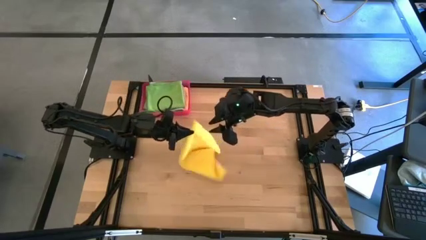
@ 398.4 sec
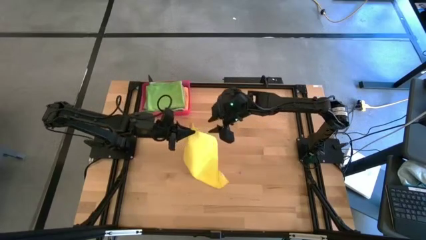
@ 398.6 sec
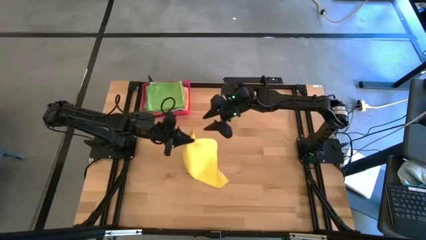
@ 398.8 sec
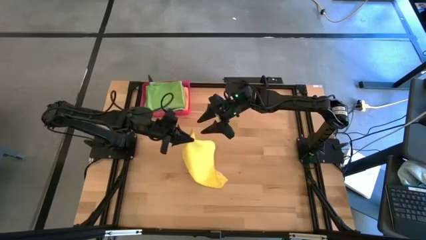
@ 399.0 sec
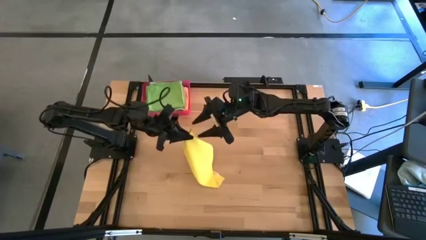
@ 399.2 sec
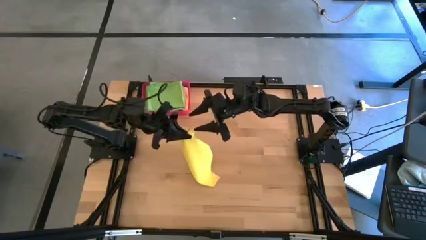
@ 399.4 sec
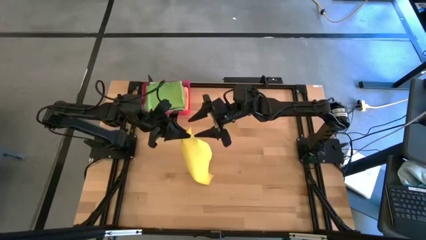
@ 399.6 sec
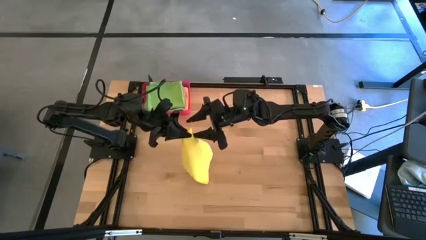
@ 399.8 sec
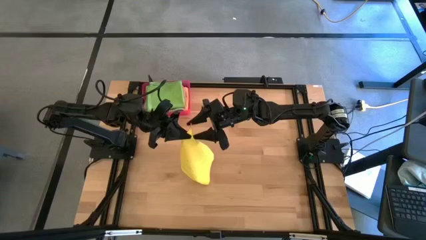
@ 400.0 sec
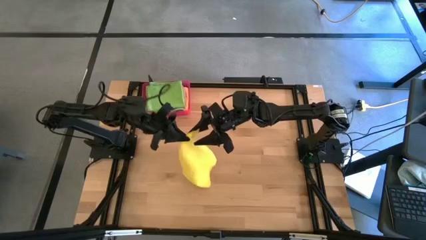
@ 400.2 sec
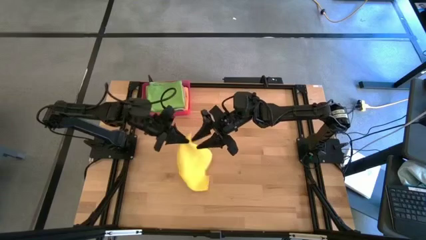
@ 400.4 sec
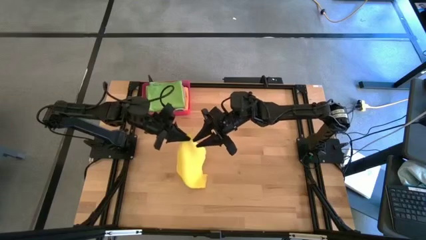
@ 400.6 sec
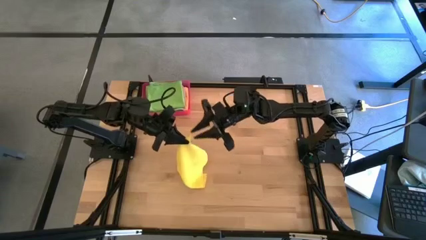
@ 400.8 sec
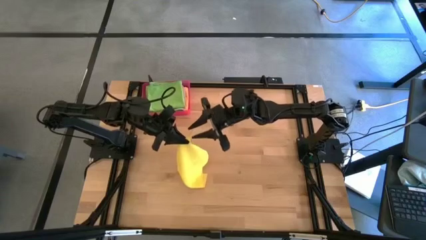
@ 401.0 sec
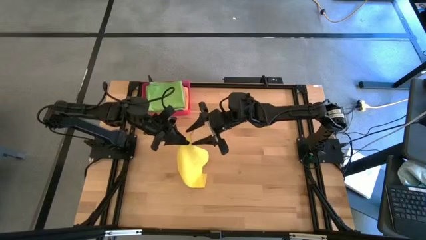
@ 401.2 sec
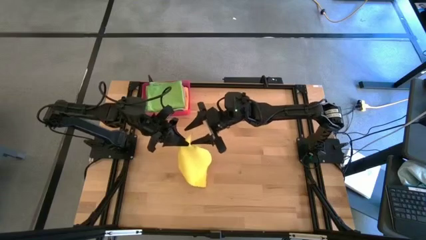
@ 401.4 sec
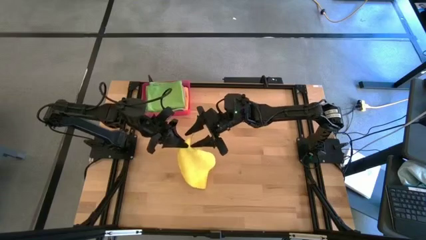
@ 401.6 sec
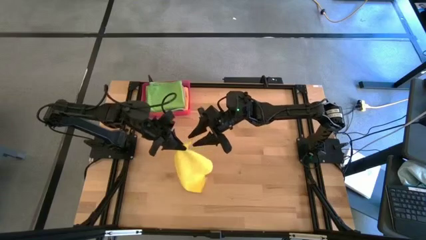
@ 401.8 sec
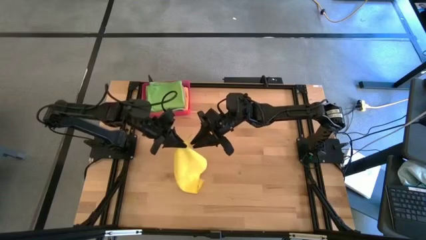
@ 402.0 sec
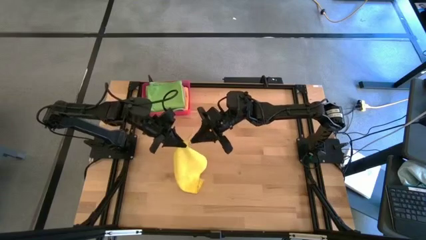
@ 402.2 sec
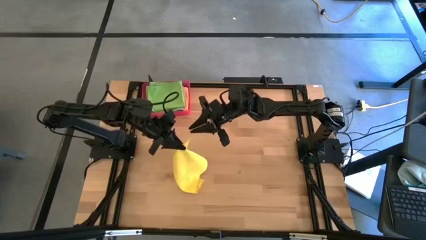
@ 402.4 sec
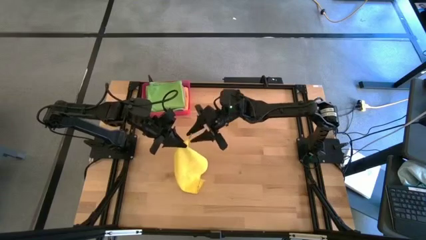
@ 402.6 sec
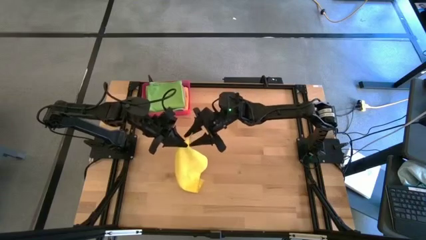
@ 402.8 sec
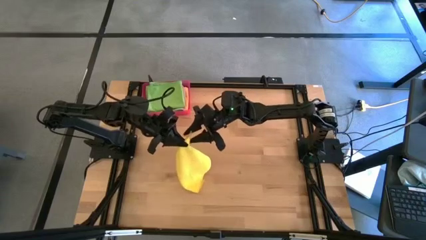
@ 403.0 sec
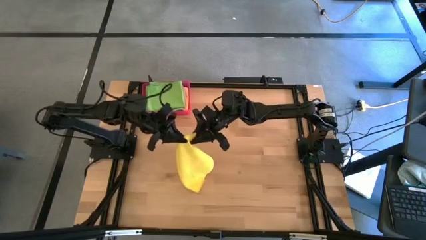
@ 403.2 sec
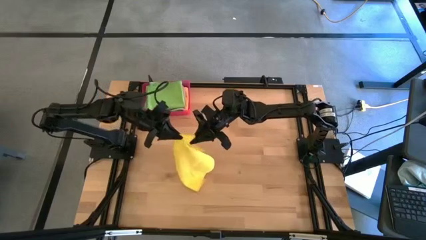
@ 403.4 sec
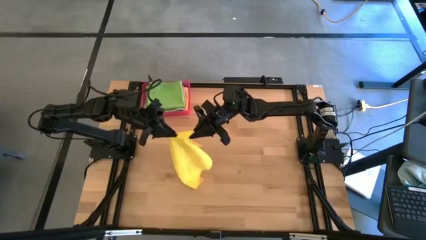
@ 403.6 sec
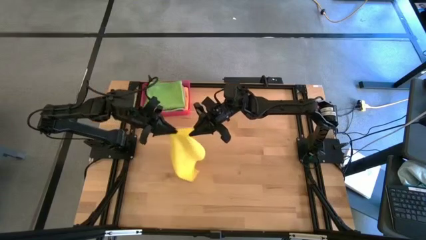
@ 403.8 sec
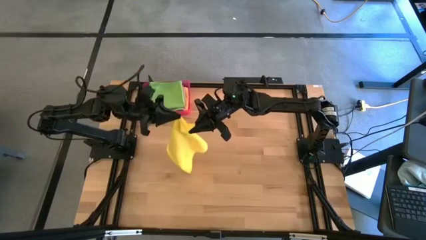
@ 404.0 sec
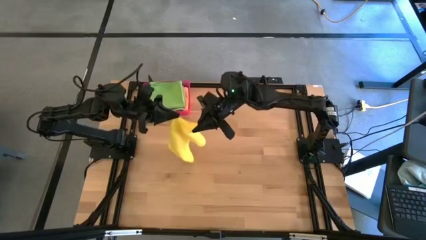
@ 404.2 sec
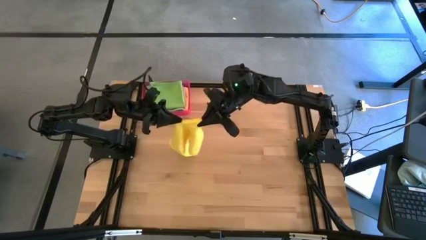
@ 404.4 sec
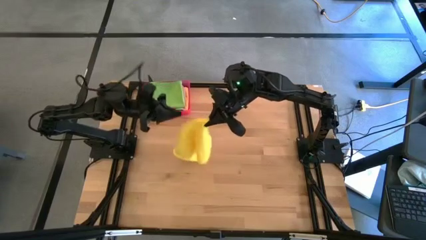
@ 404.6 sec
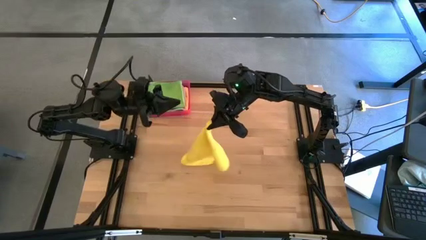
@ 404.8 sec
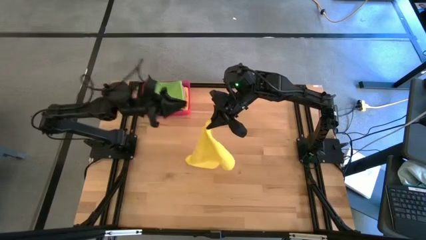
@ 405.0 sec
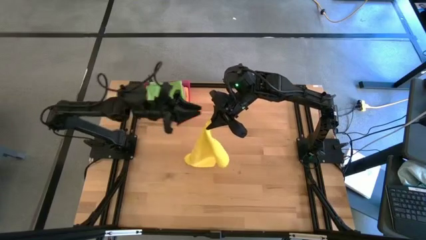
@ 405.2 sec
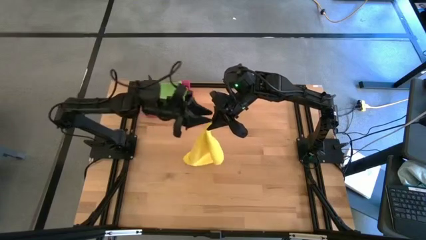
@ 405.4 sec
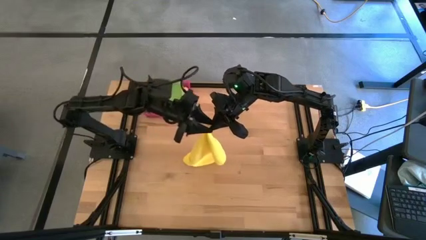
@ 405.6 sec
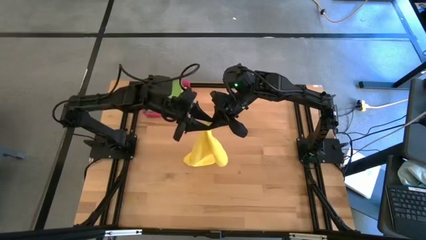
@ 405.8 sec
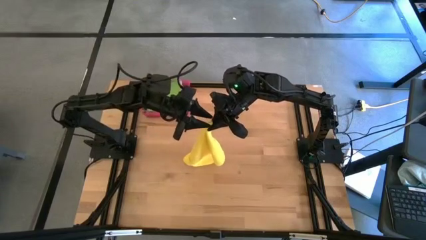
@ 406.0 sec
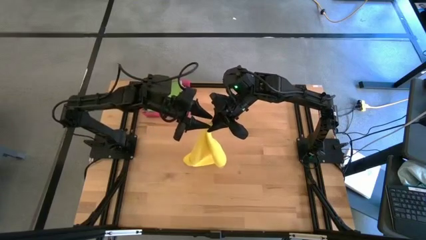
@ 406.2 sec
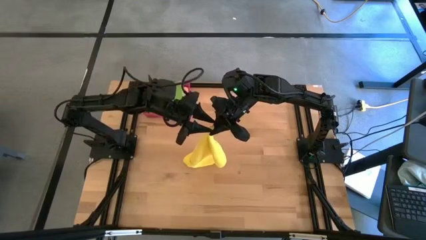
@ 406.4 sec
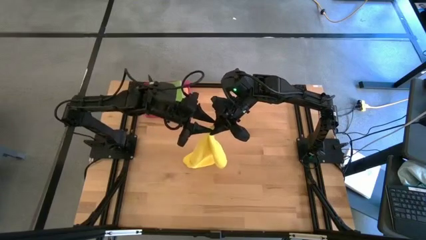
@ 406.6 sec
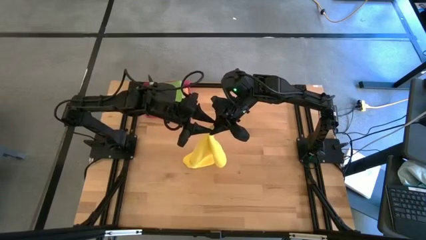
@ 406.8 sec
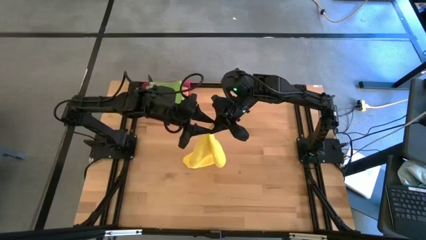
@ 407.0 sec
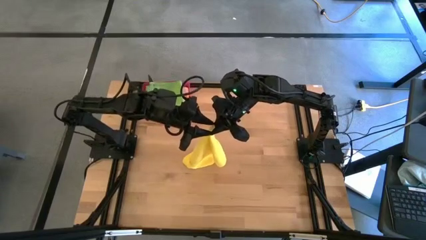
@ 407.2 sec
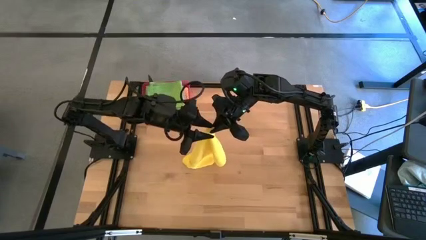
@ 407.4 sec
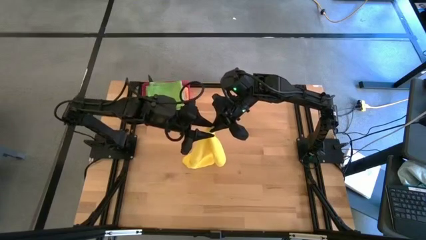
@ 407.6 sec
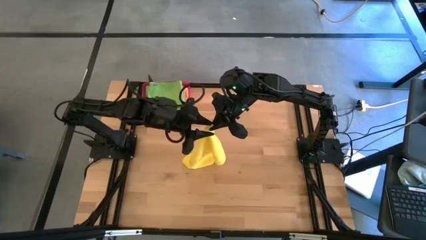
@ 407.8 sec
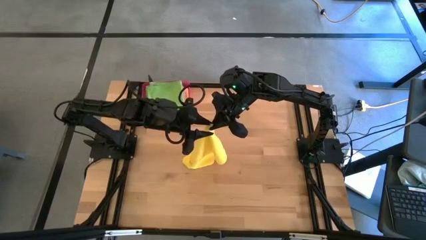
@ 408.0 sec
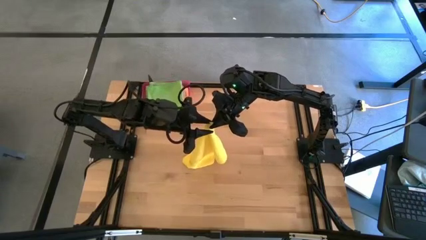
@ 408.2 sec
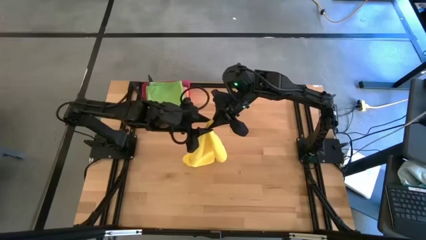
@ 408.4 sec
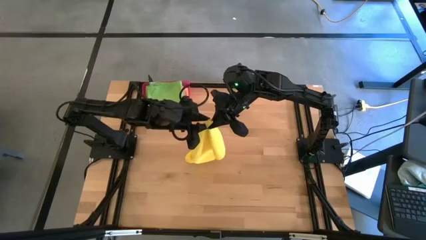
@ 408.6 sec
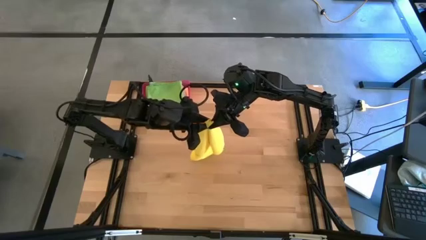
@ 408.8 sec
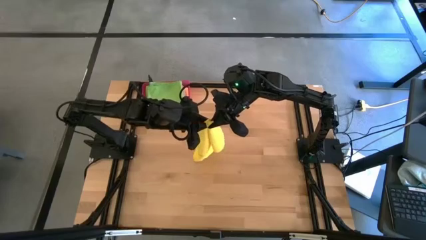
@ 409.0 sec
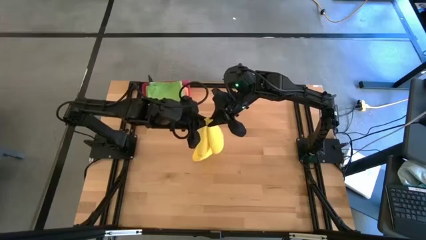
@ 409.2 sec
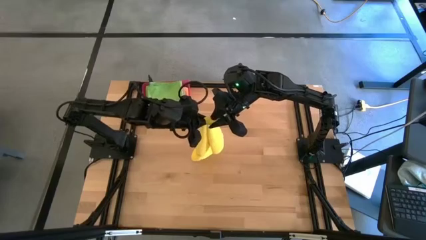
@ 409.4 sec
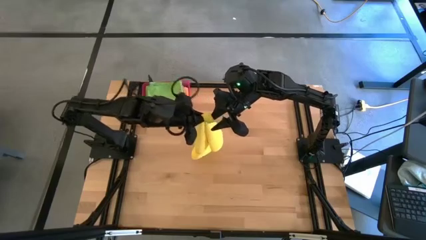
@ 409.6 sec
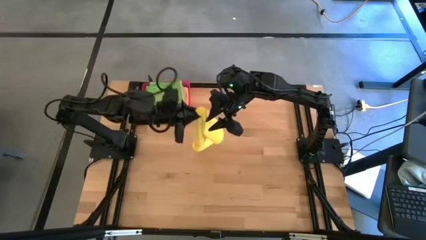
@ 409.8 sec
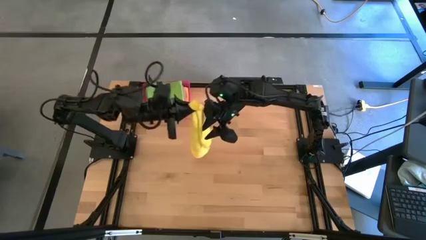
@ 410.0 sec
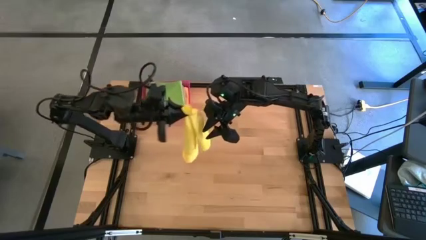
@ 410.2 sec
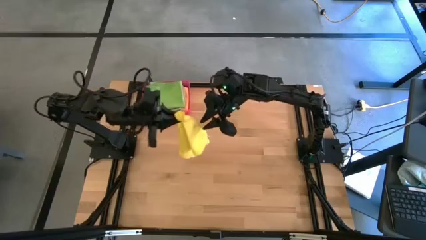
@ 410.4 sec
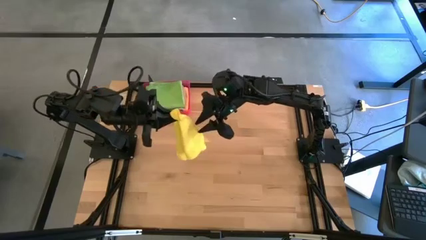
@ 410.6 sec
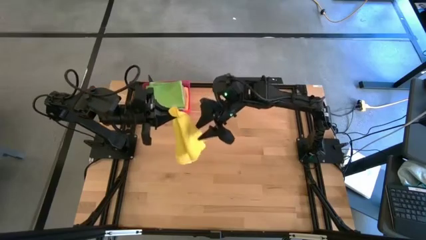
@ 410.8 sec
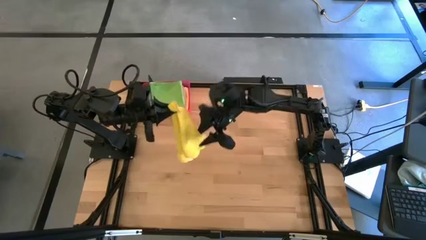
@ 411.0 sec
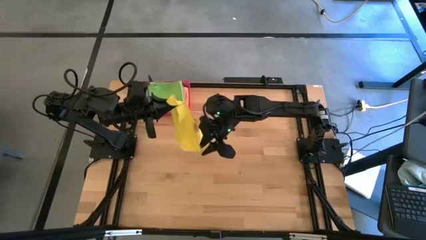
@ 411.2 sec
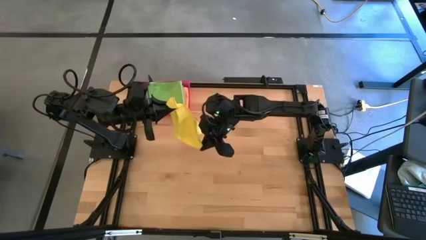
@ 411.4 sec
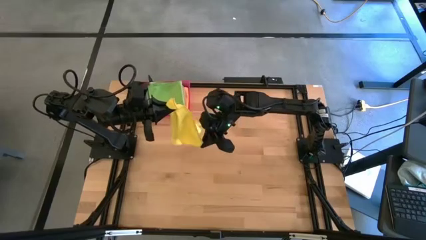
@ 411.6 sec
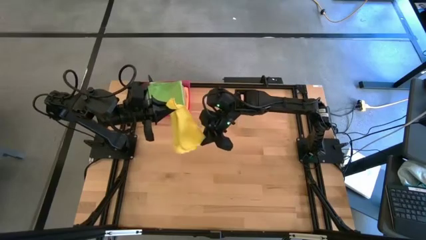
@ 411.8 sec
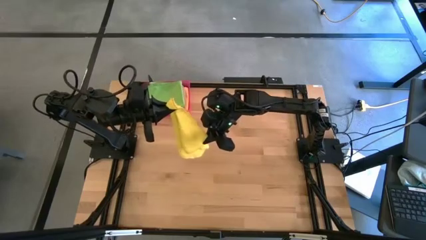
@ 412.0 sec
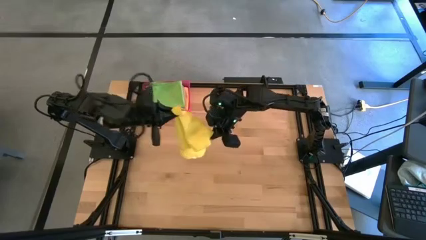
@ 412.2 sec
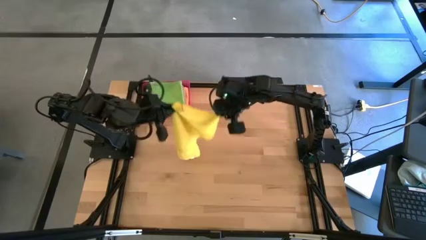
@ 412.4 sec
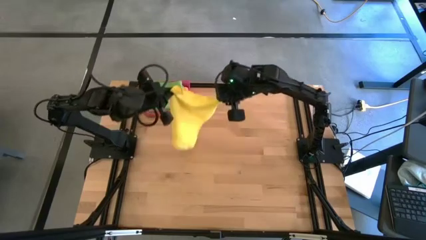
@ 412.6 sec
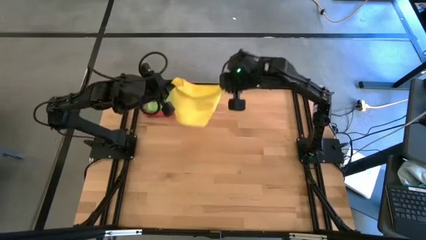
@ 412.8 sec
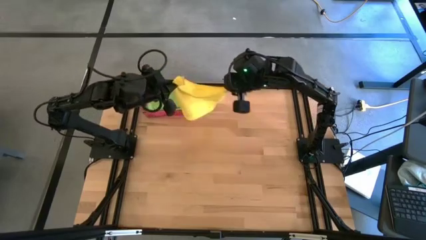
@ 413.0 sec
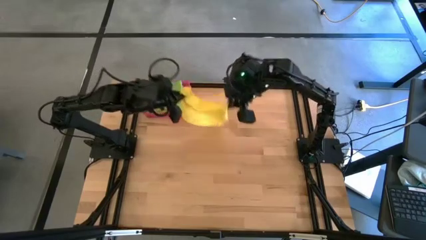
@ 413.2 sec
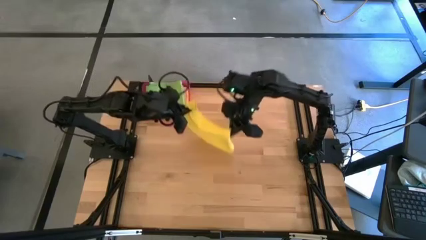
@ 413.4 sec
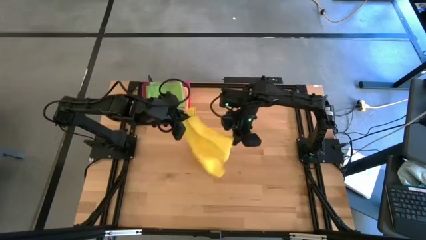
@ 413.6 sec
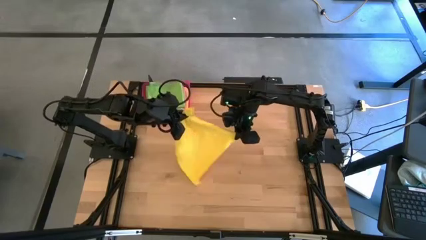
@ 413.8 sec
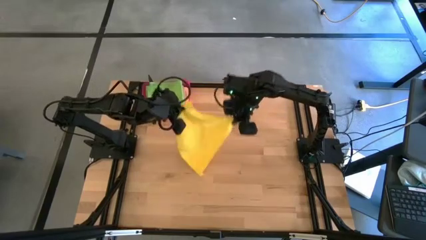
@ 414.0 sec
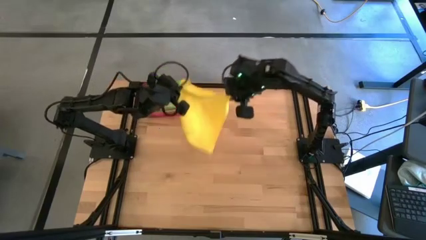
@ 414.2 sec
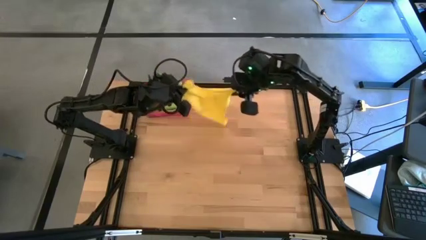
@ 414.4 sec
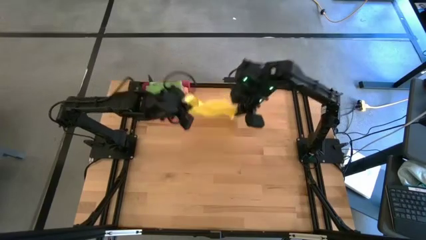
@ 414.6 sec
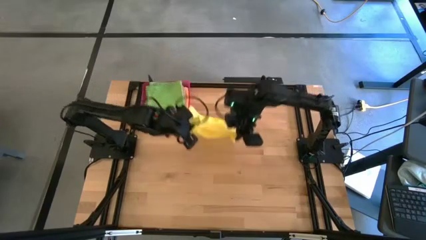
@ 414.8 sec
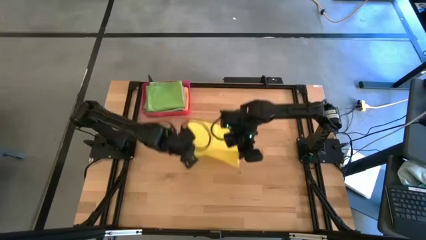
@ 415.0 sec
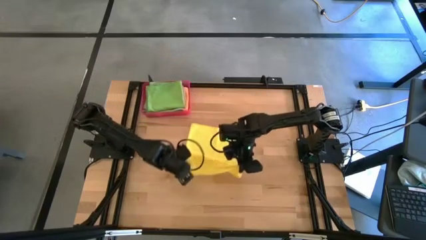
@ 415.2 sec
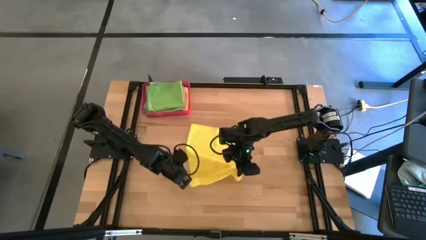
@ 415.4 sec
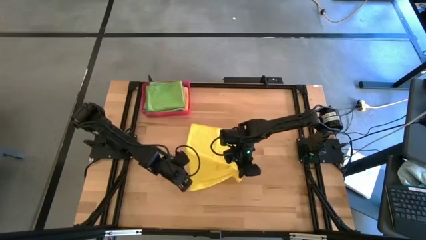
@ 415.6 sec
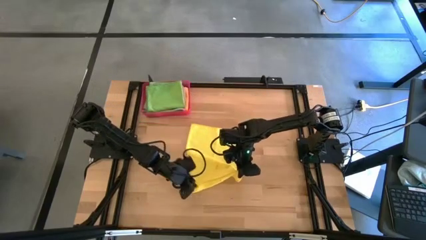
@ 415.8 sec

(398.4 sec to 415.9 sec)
Task: Fold microfiber towels
Fold the yellow microfiber towel
